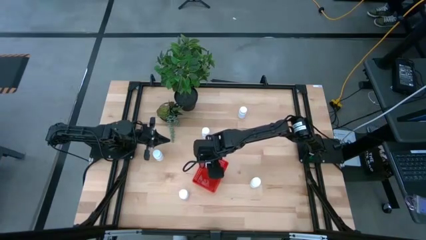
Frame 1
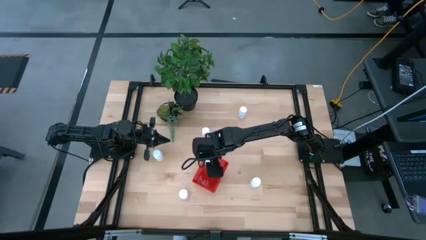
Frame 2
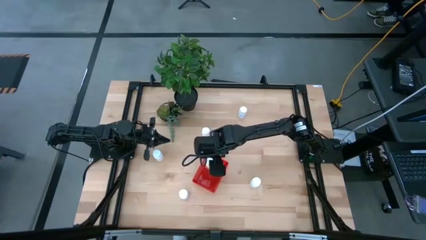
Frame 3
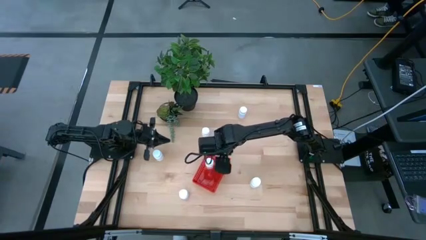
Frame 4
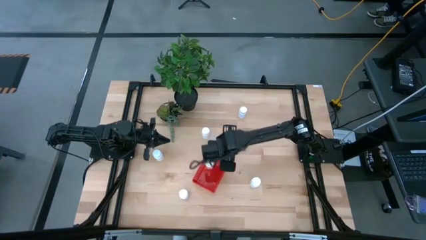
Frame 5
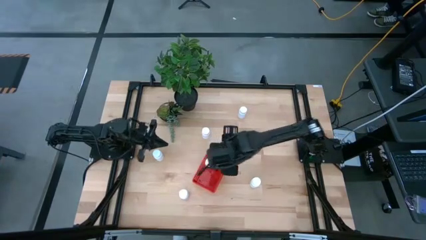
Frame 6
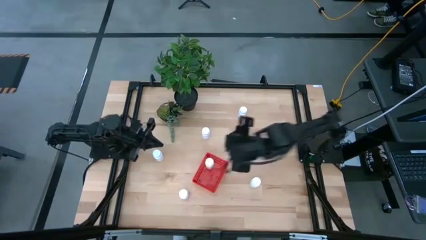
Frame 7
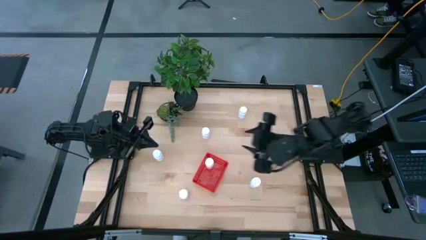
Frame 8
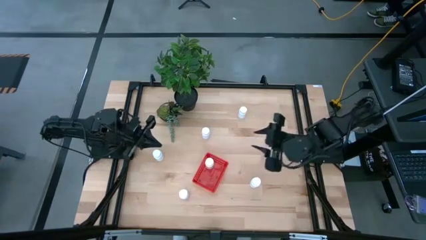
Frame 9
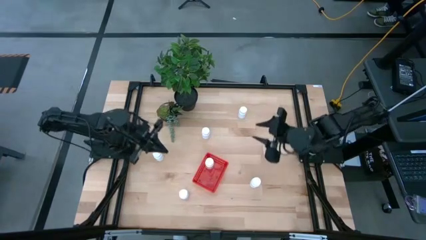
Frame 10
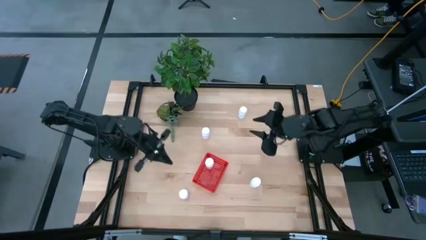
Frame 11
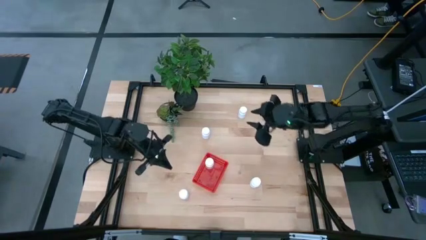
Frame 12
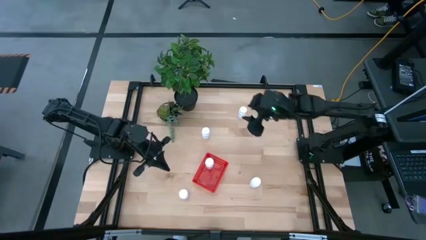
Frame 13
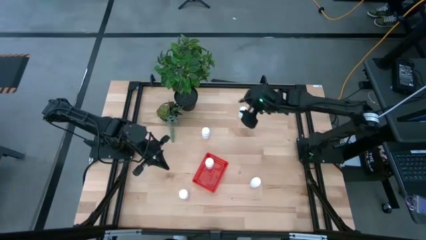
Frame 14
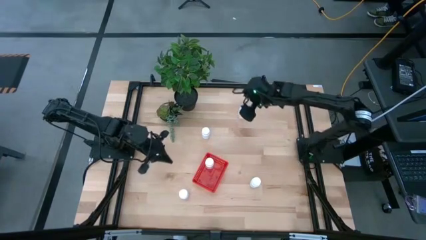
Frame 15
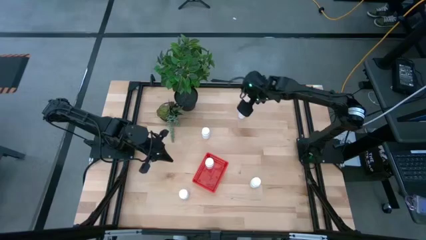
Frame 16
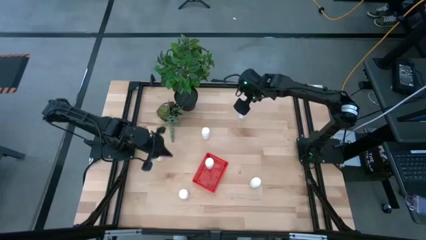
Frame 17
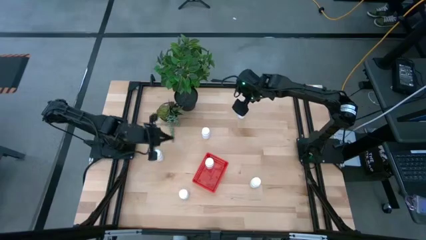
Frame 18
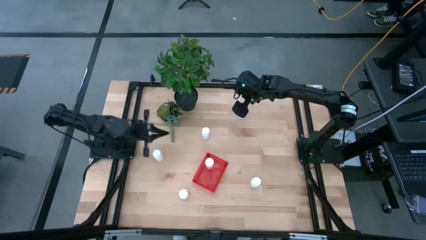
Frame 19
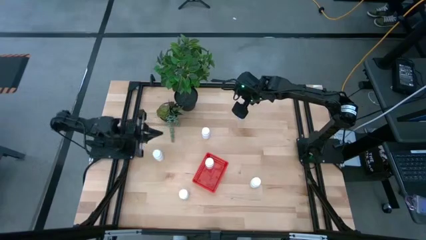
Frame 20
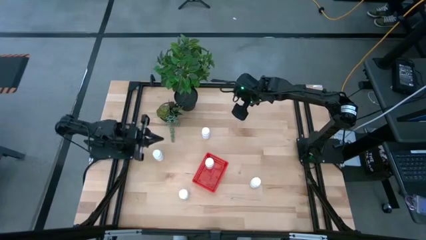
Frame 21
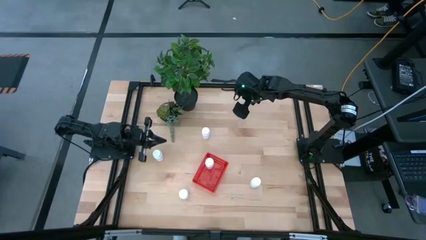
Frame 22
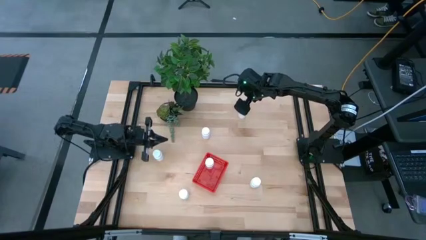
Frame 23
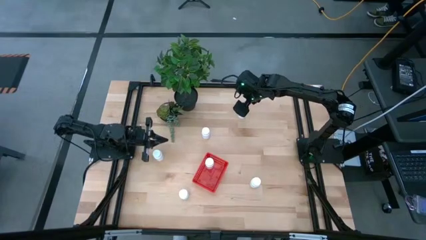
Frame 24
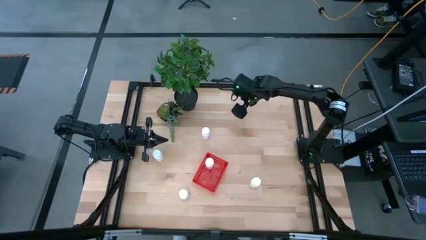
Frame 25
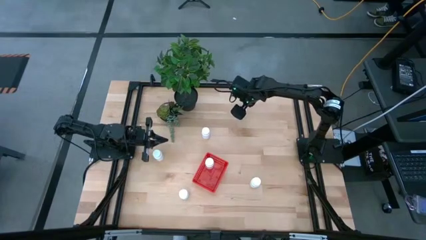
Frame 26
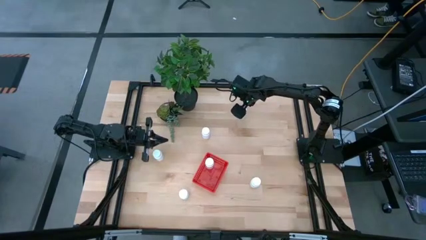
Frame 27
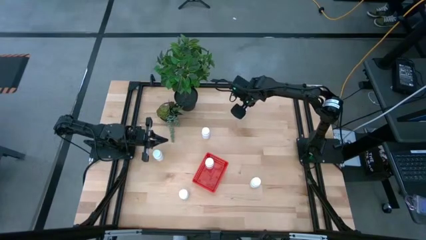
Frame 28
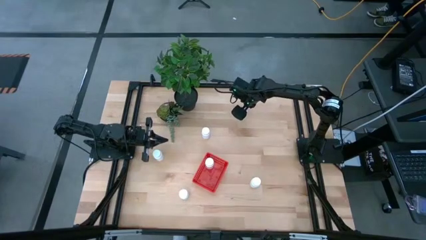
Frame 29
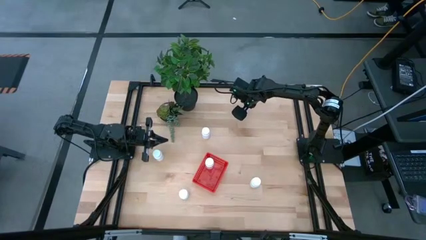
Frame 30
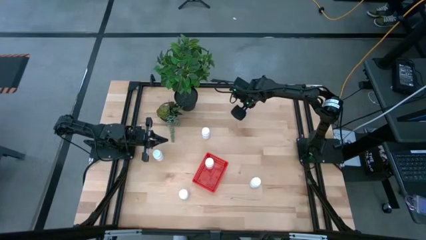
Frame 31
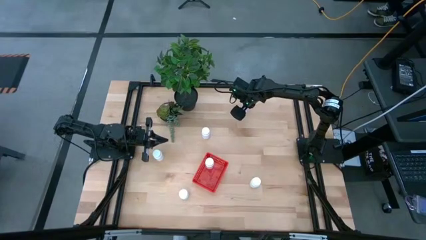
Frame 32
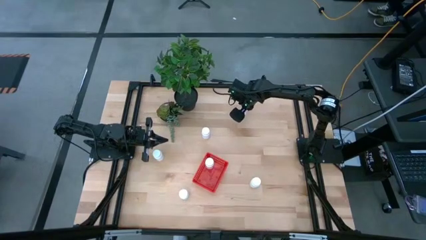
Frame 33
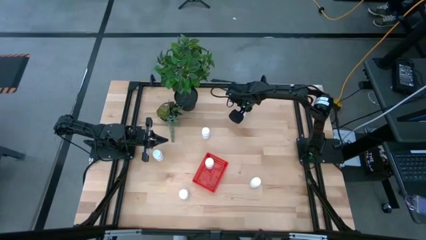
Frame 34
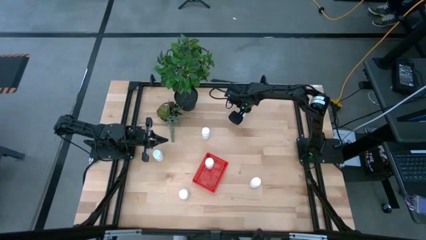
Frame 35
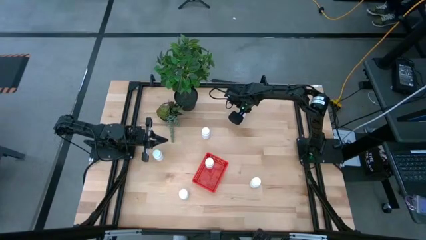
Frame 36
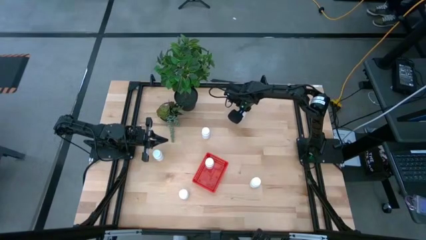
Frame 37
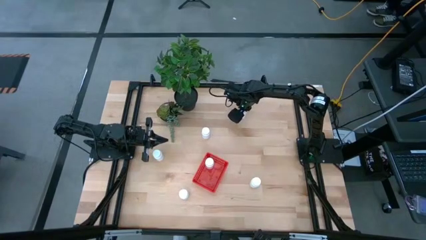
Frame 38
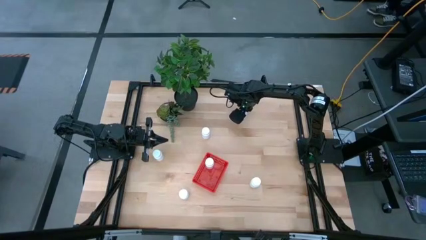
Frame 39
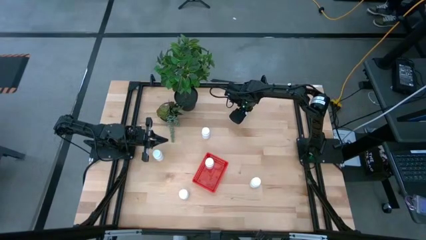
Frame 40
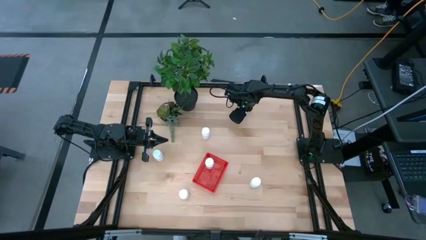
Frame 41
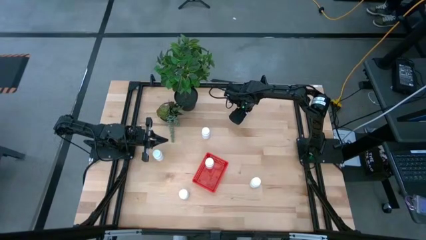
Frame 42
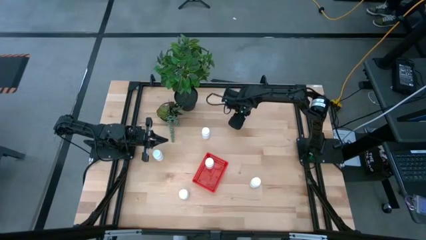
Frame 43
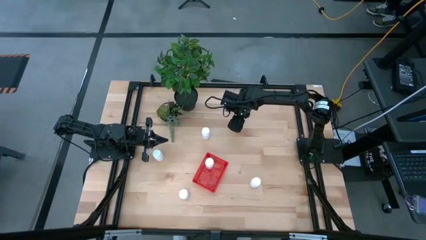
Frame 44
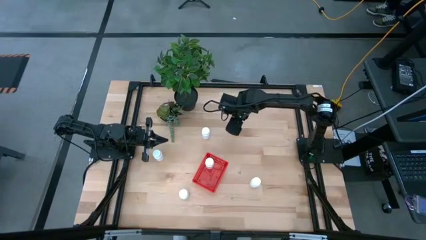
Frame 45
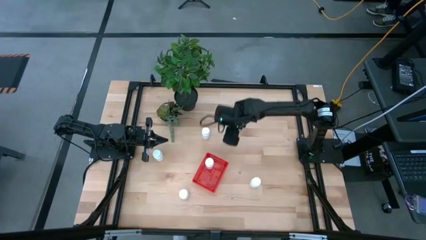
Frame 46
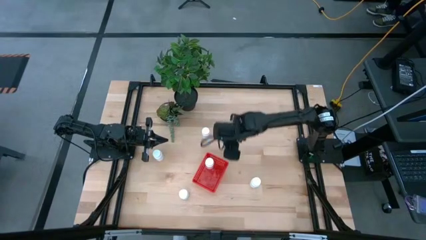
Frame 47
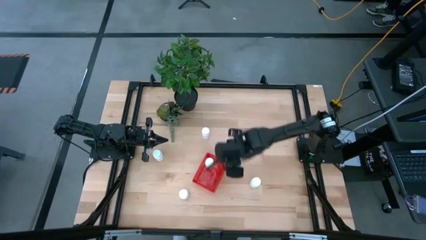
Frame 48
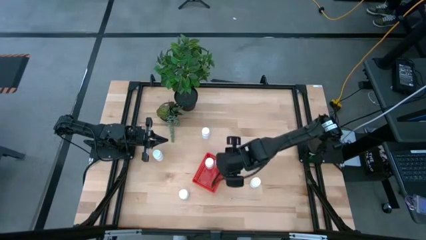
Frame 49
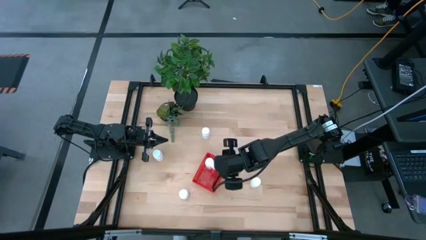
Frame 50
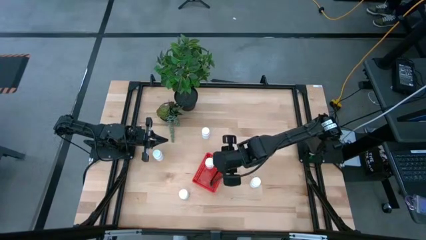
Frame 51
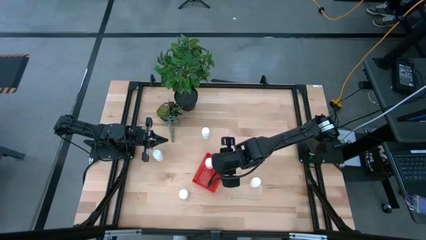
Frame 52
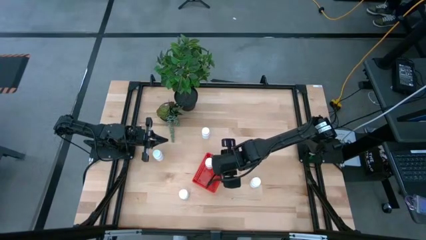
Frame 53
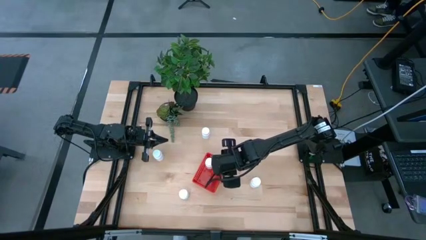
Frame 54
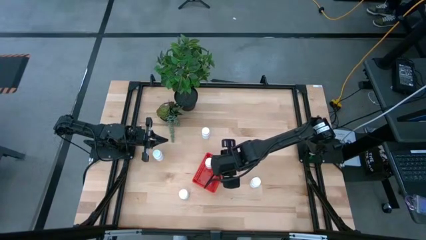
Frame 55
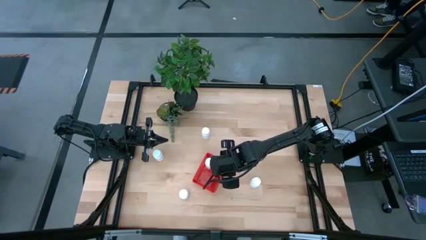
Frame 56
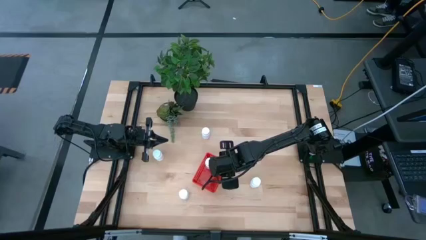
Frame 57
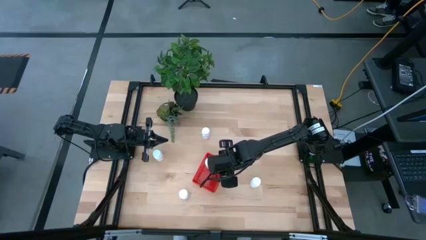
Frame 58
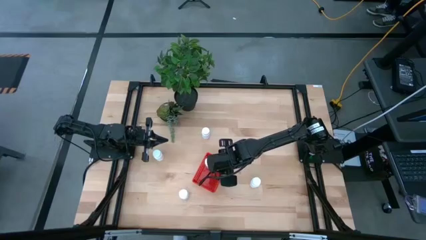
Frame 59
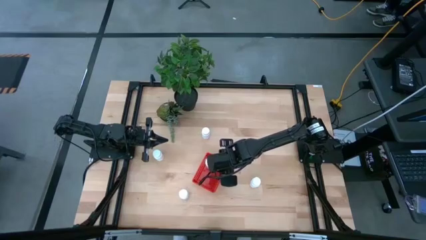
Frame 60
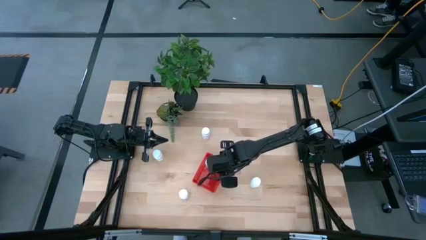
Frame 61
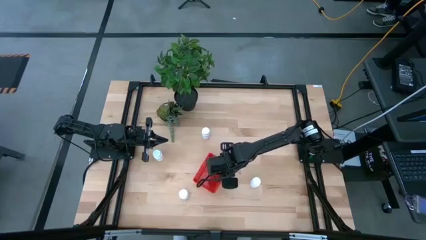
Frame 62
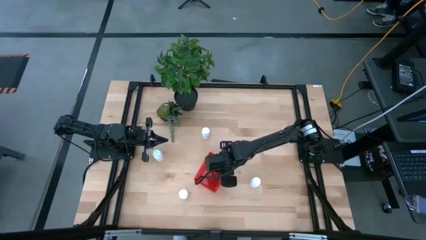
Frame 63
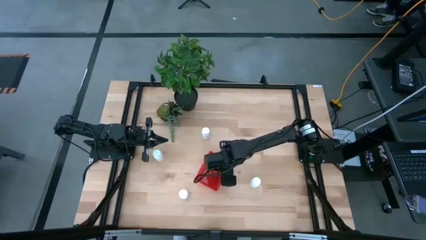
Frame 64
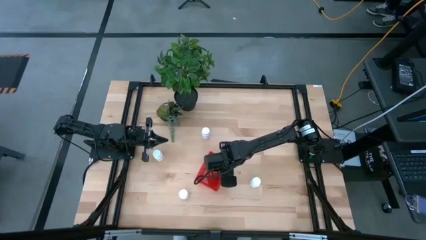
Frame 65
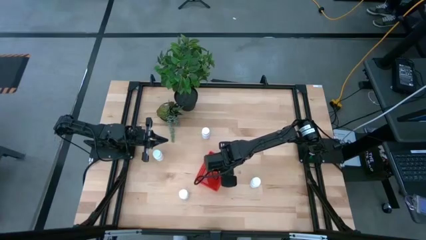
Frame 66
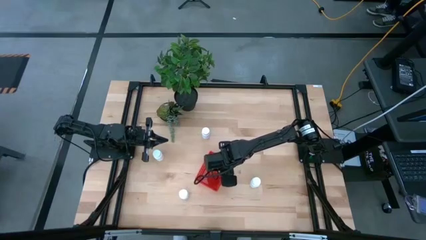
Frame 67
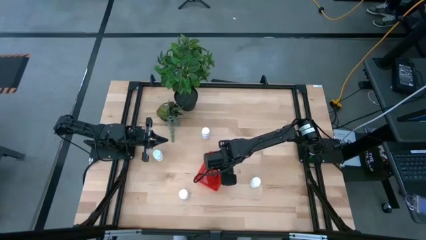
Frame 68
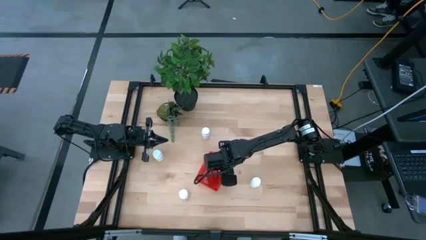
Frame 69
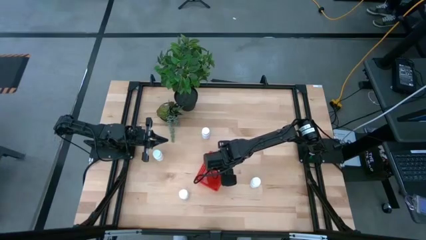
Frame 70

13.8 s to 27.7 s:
Task: Pick and place pill bottles into a basket
Put the white medicine bottle into the red bin
